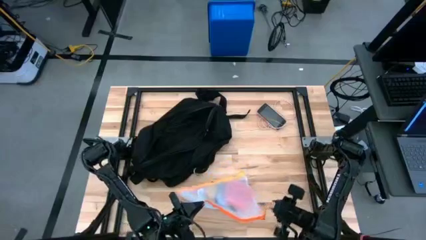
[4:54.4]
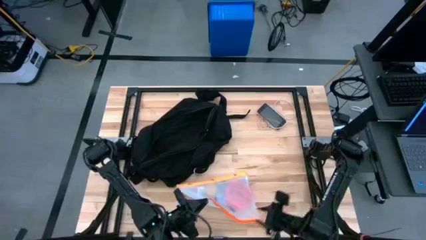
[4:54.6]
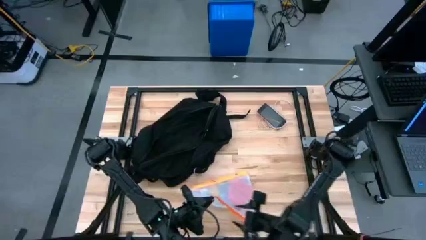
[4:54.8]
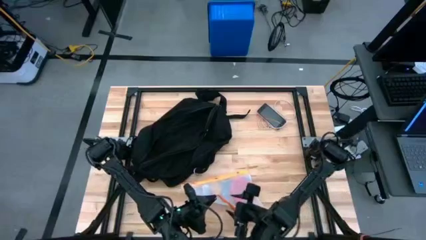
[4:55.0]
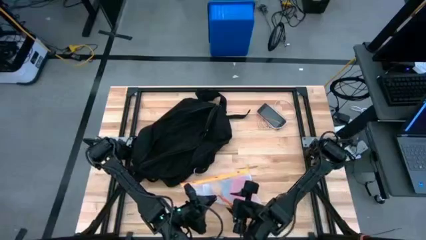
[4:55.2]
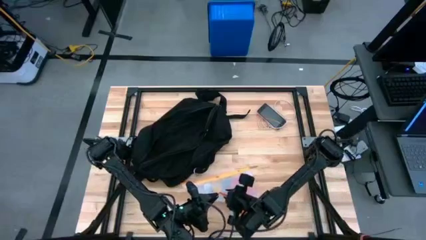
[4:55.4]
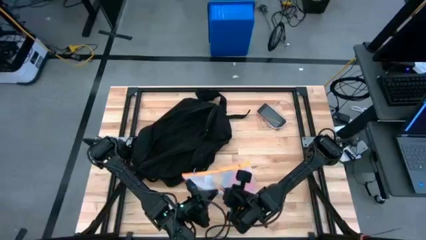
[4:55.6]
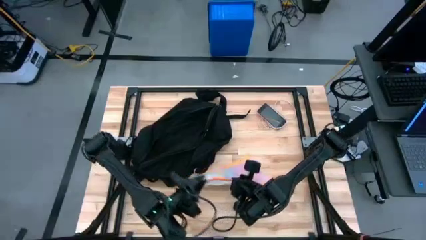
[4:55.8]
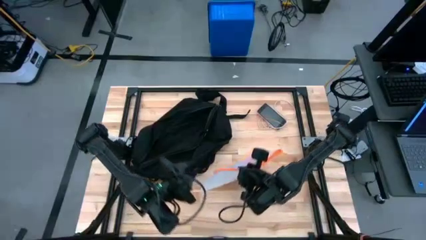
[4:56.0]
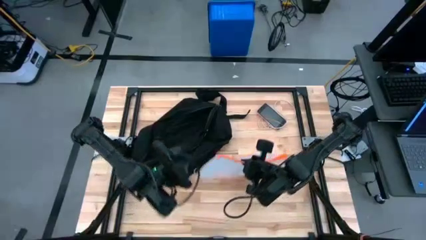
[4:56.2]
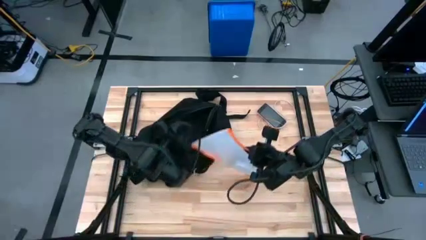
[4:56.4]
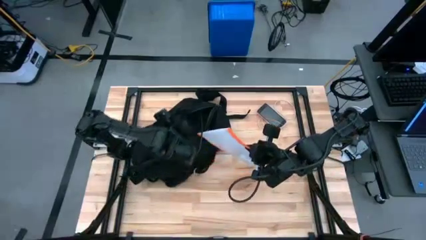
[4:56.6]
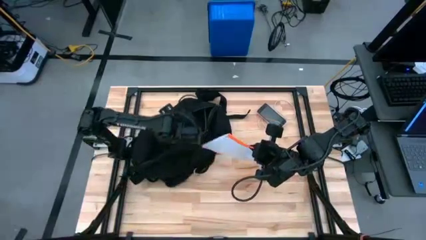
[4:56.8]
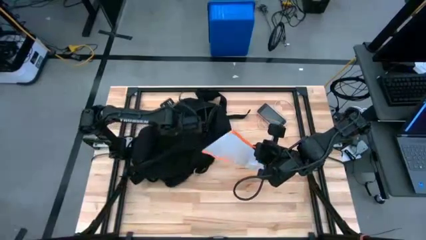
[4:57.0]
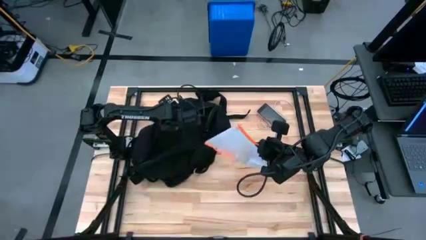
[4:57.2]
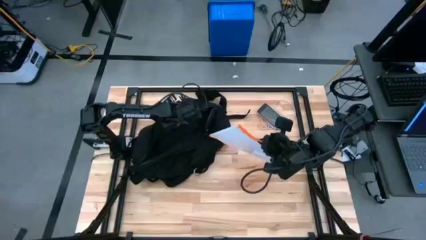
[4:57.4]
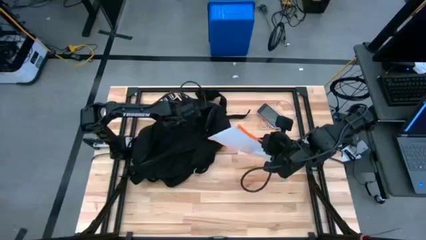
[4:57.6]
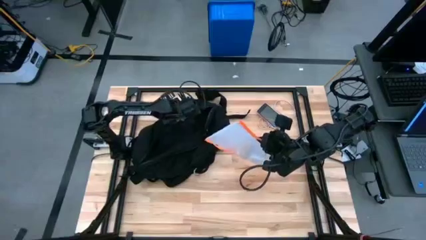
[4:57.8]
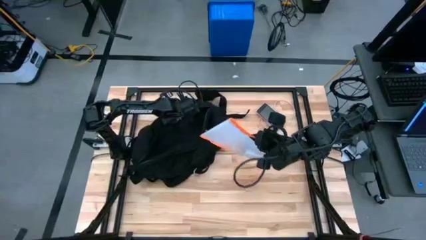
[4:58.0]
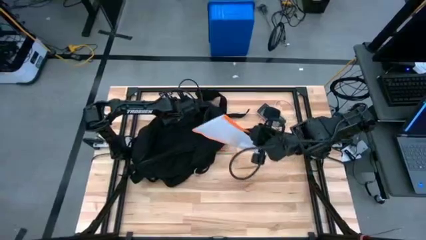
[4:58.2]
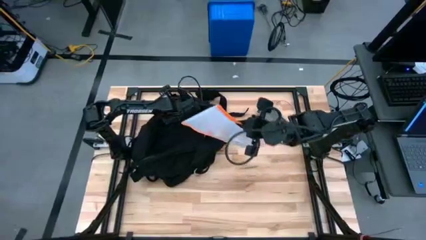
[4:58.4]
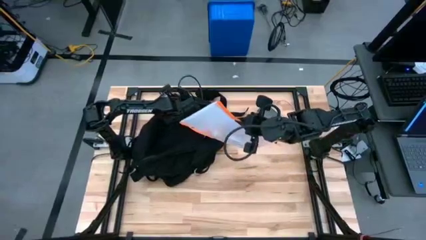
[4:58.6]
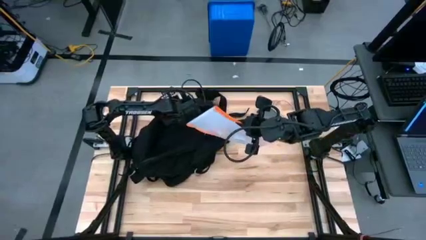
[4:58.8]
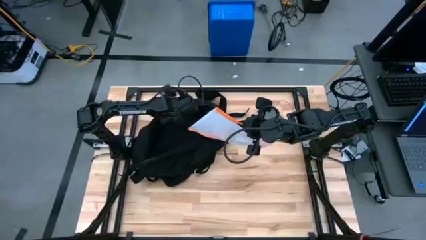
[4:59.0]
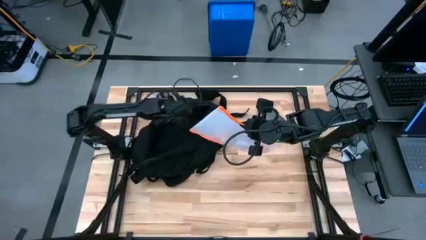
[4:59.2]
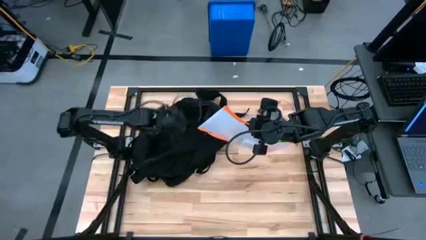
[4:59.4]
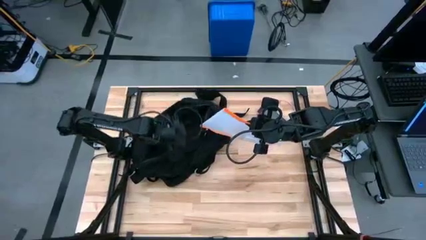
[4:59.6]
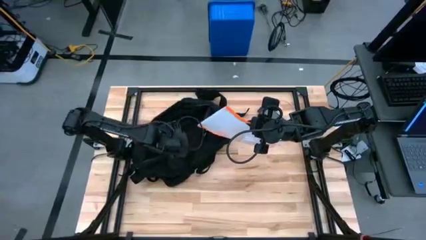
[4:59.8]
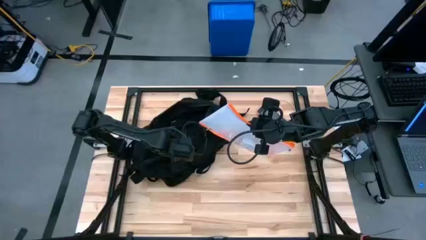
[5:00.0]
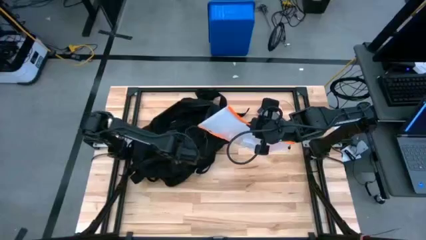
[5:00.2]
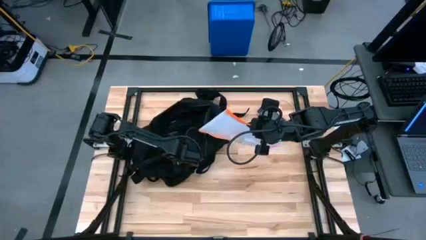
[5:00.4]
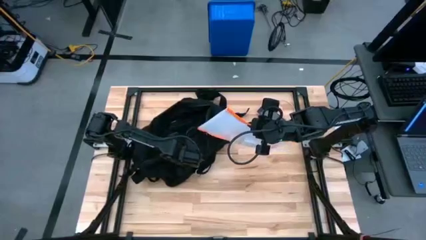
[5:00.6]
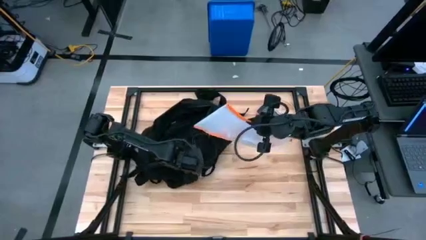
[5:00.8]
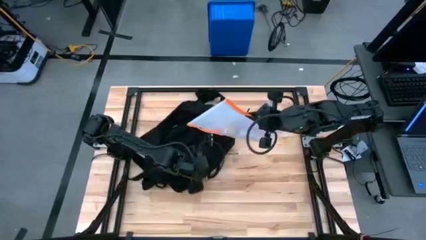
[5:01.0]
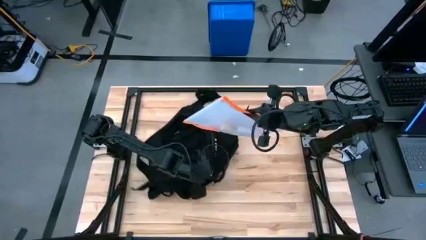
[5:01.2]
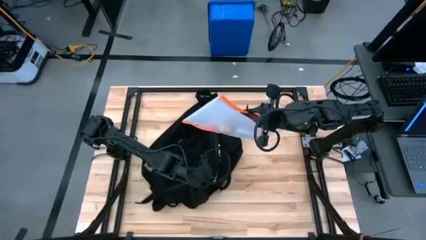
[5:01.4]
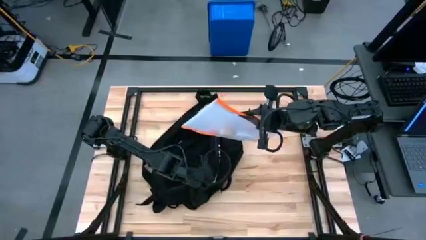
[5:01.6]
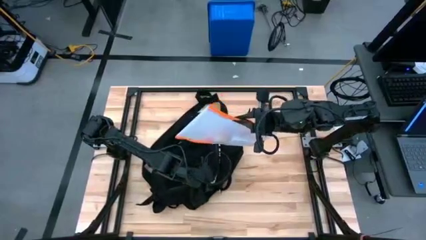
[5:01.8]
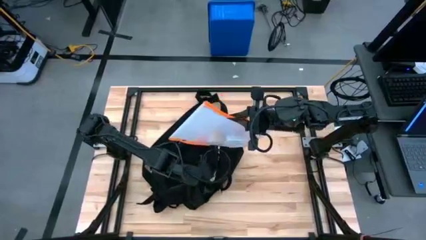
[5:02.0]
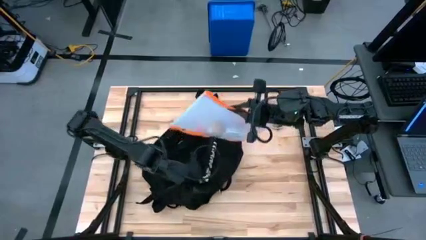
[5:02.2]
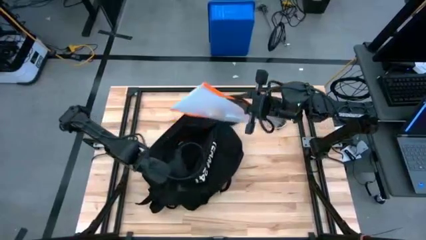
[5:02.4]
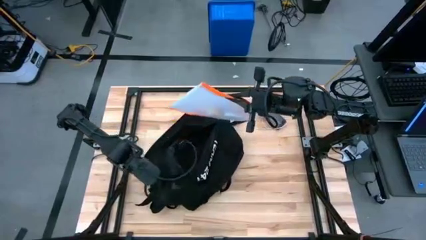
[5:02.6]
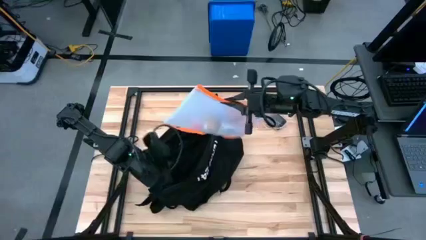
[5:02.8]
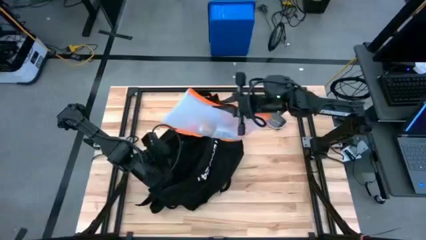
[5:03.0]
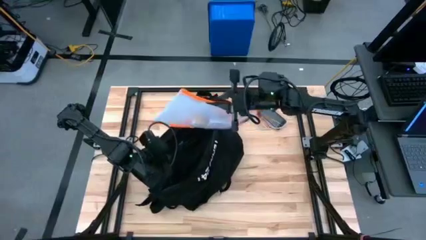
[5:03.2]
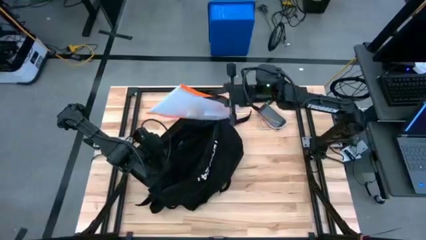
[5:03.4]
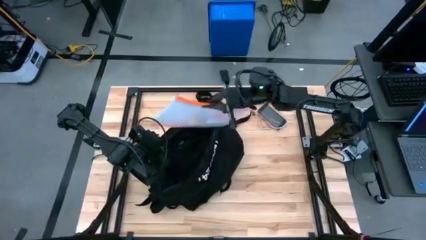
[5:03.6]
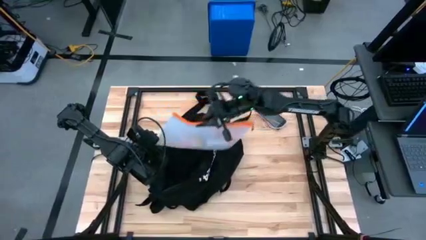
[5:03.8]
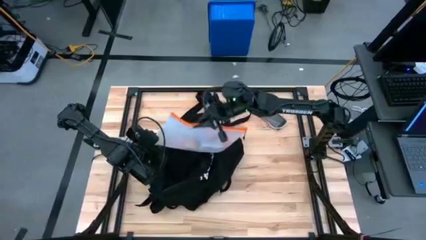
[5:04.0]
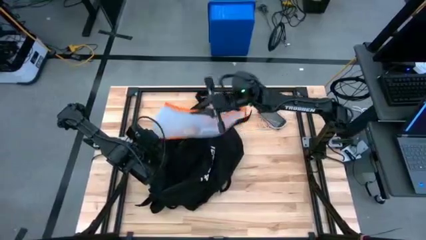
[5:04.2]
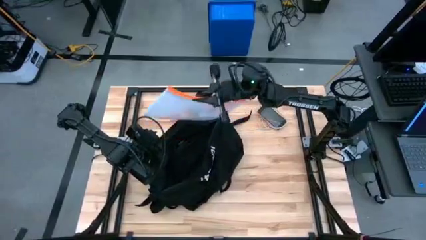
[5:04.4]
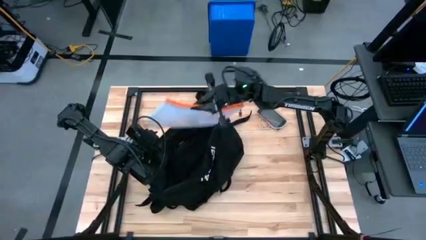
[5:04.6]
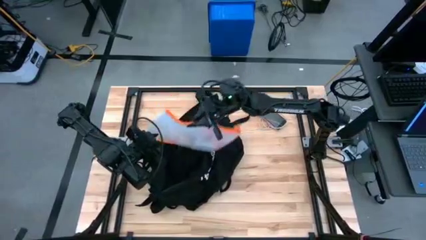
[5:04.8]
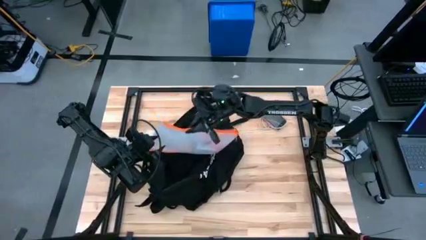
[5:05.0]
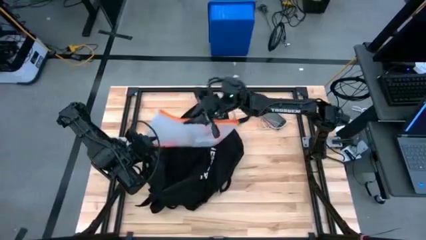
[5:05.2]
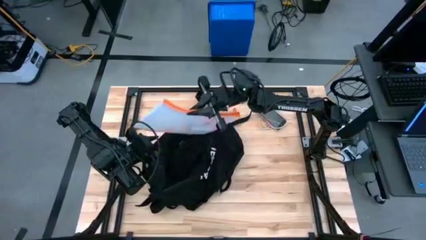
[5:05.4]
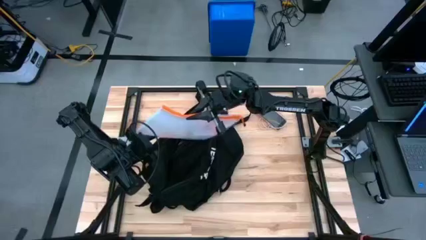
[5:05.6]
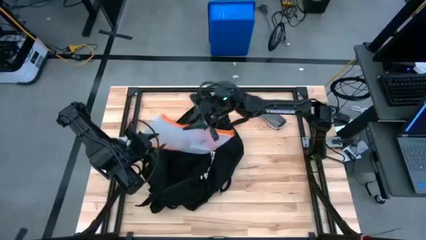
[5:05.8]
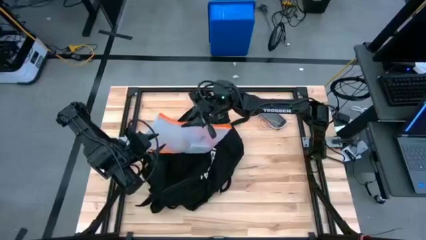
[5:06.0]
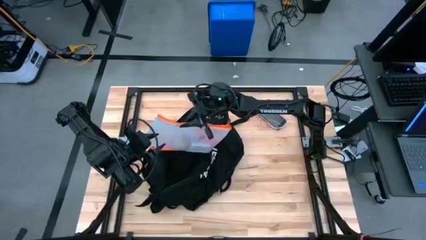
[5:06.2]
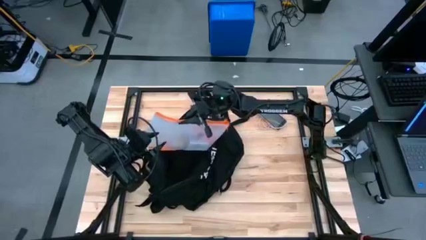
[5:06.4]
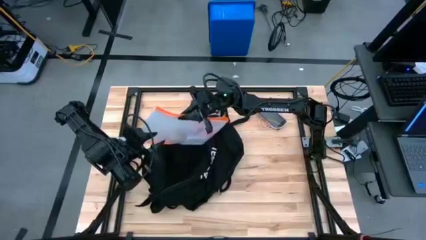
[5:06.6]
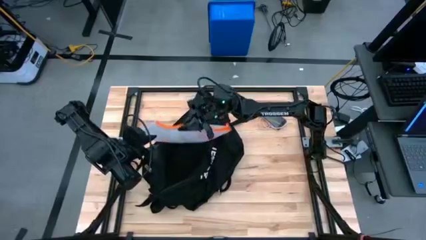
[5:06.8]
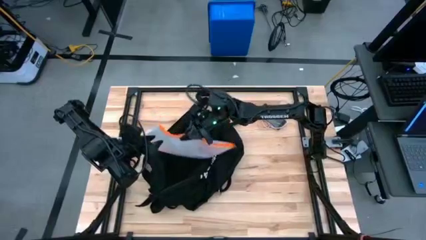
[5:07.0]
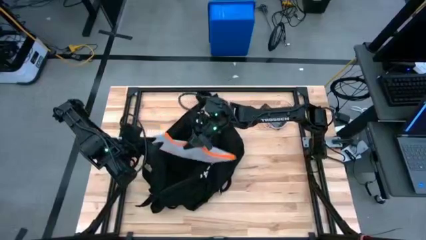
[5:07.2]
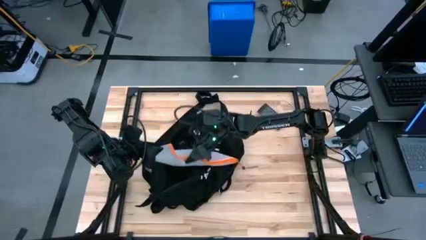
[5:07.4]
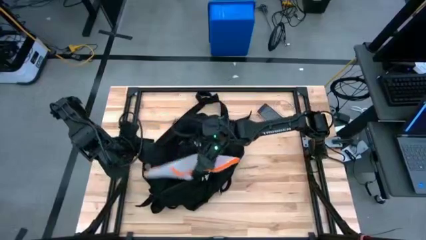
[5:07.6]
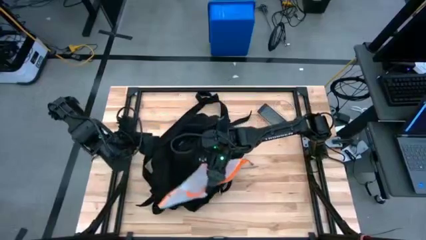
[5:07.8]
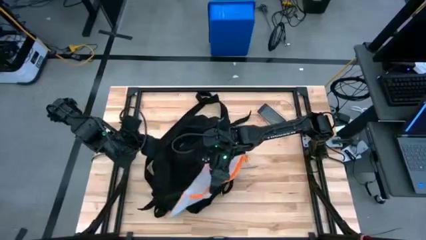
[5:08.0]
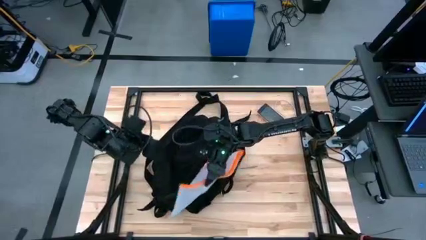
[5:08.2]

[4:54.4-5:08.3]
Task: Unpack backpack
Put the orange zip bag into the black backpack

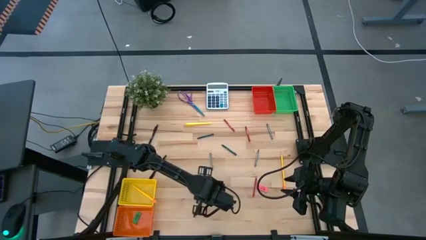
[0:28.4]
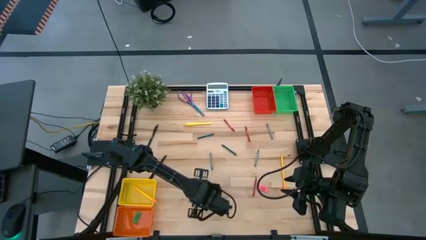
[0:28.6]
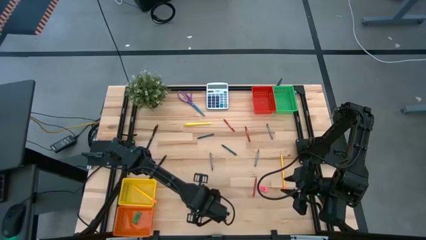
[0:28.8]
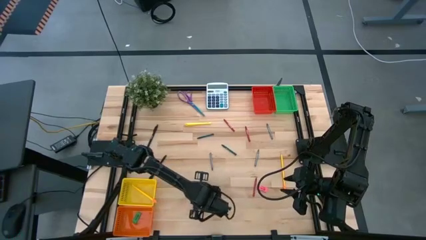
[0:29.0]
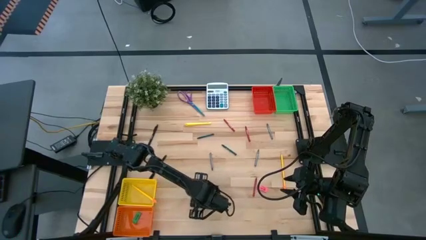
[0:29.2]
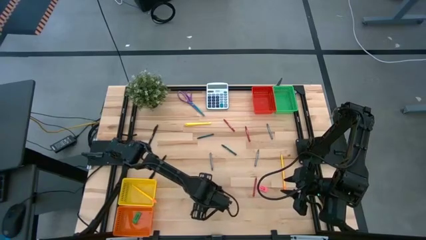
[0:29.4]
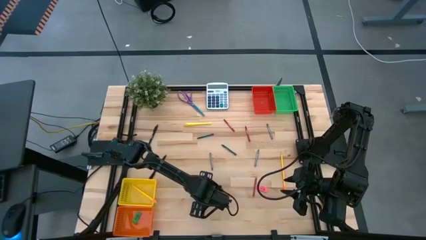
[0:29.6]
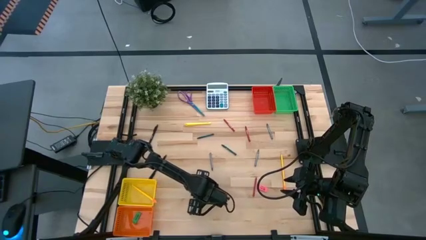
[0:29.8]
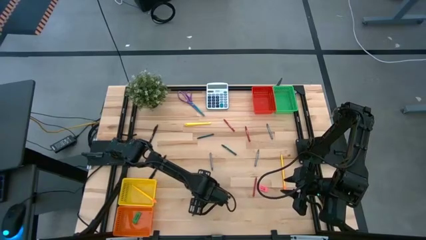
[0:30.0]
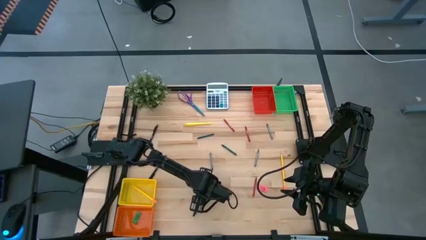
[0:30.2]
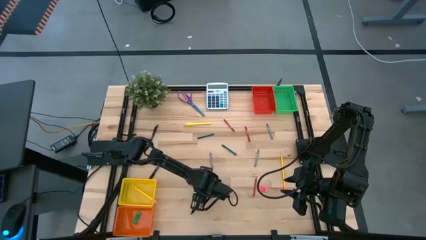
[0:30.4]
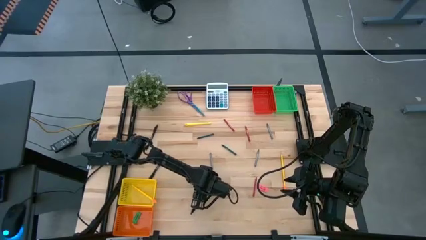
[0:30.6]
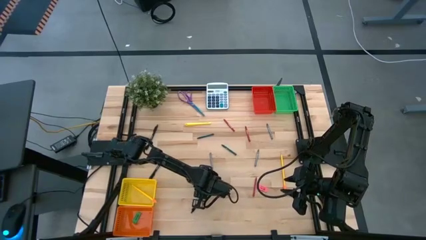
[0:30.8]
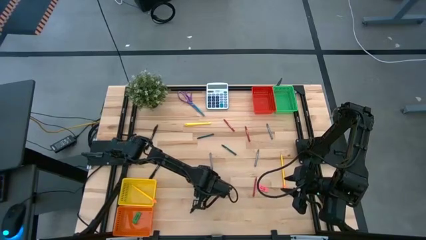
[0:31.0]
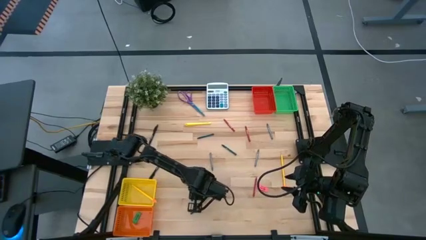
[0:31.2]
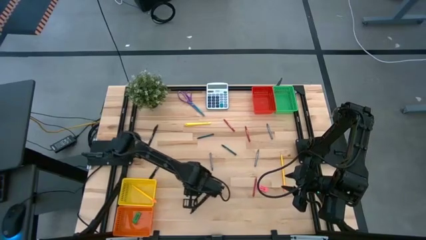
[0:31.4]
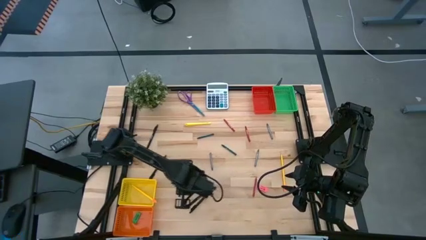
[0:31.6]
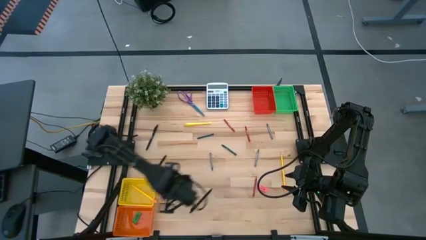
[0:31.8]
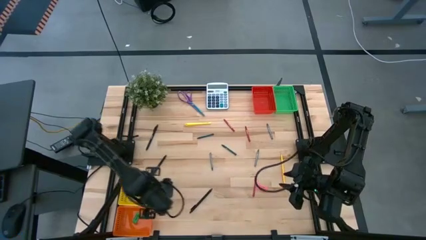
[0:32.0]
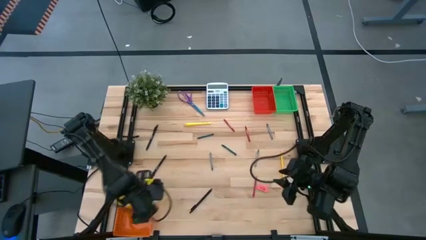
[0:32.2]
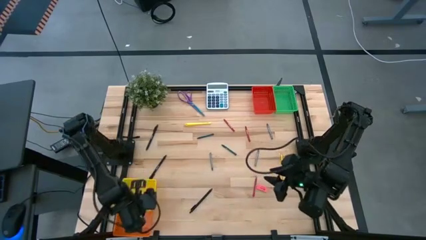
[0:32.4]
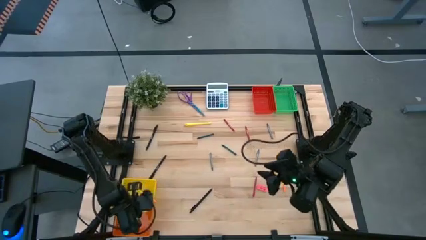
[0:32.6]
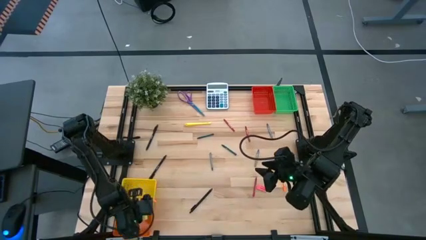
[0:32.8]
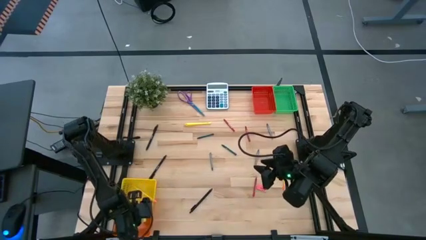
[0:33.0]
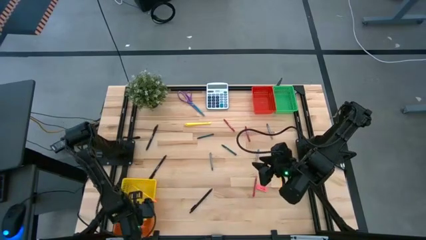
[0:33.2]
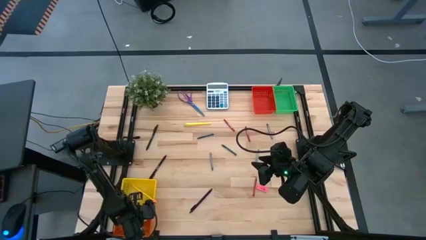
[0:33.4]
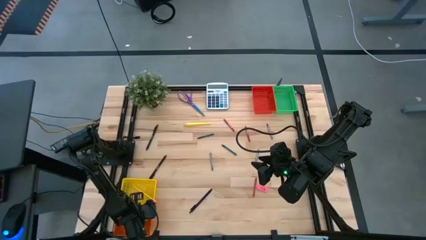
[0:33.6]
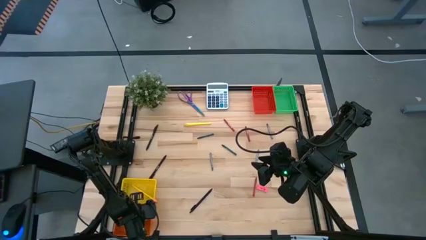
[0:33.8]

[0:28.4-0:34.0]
Task: Sort crayons/erasers/pens/pencils in bins
Put the yellow eraser into the orange bin
